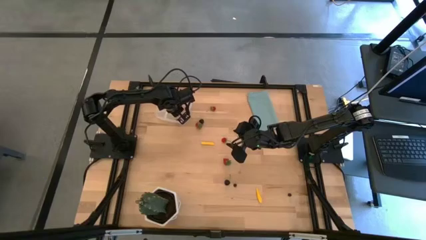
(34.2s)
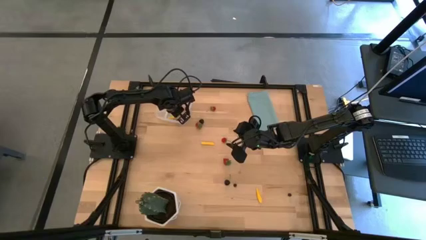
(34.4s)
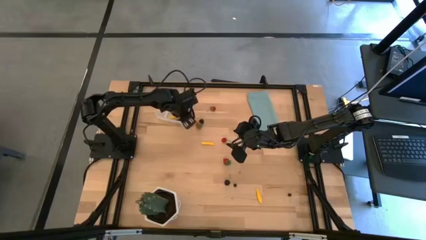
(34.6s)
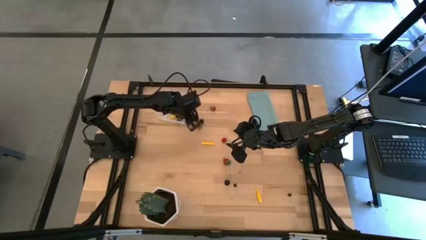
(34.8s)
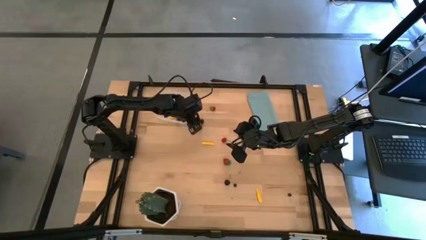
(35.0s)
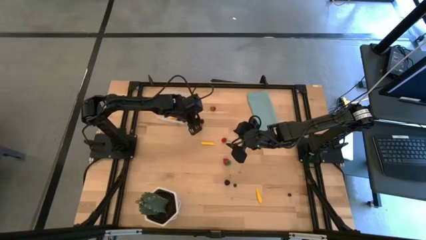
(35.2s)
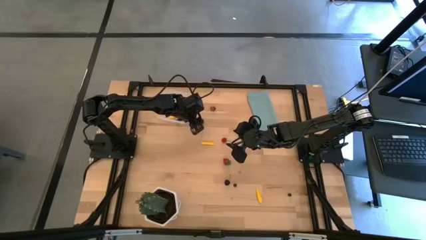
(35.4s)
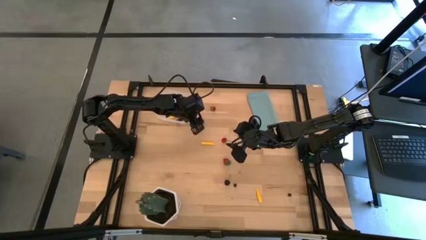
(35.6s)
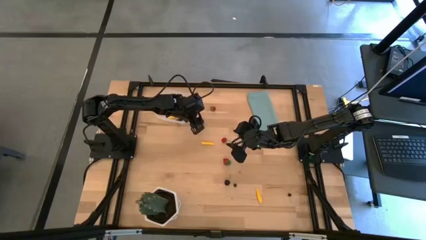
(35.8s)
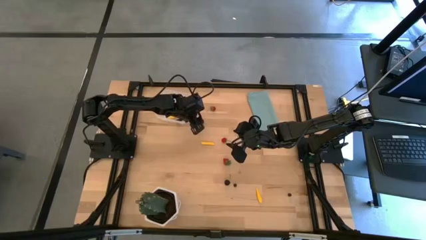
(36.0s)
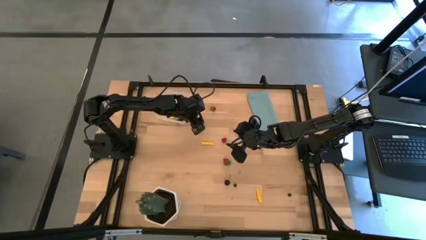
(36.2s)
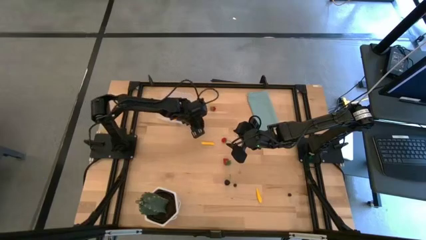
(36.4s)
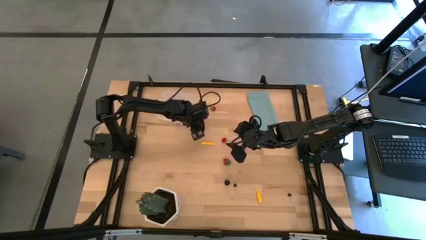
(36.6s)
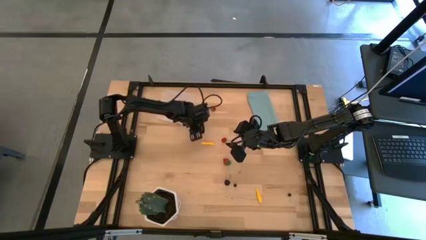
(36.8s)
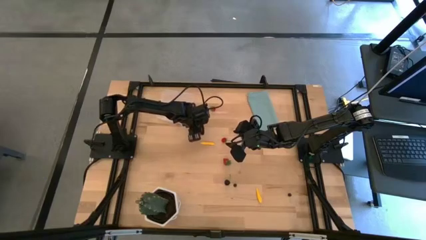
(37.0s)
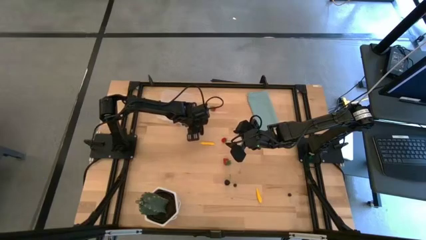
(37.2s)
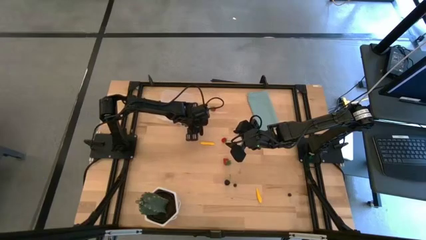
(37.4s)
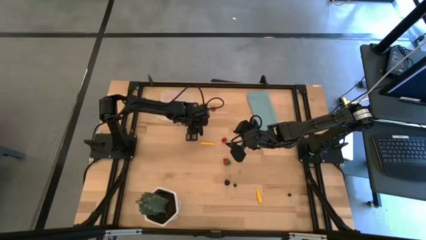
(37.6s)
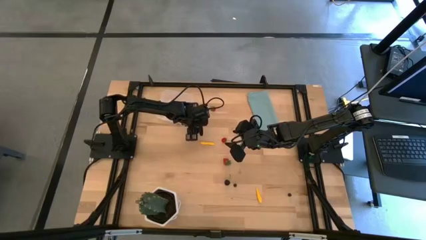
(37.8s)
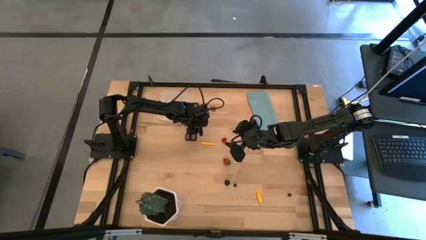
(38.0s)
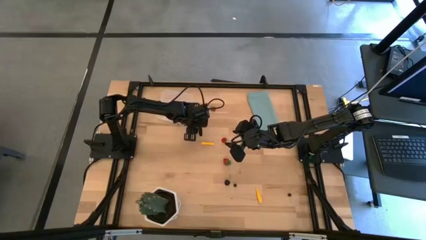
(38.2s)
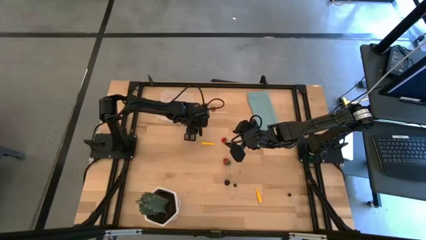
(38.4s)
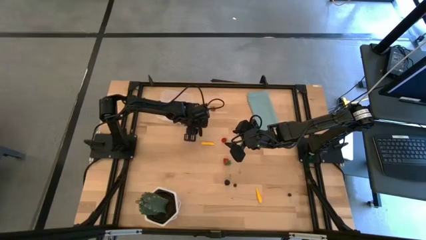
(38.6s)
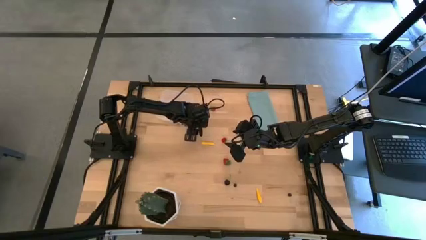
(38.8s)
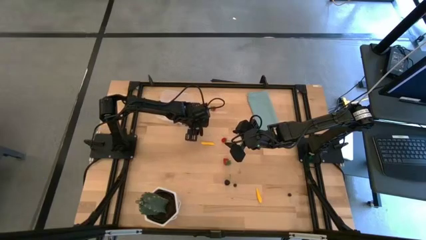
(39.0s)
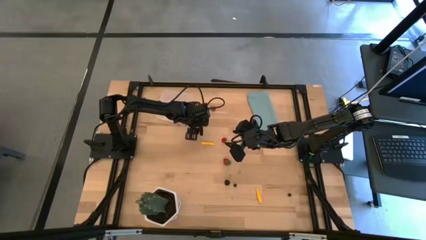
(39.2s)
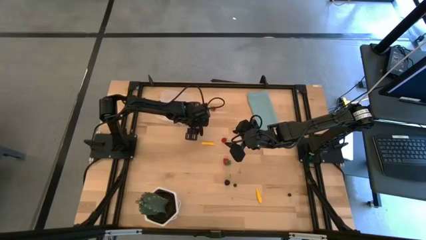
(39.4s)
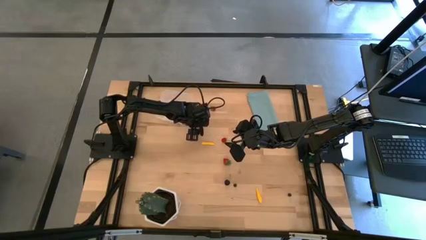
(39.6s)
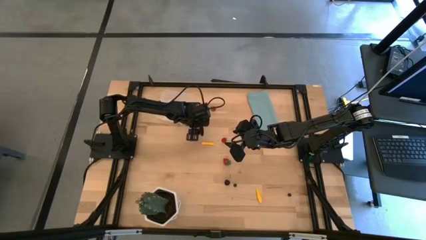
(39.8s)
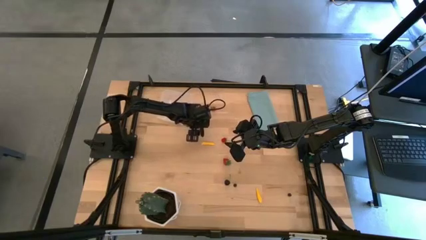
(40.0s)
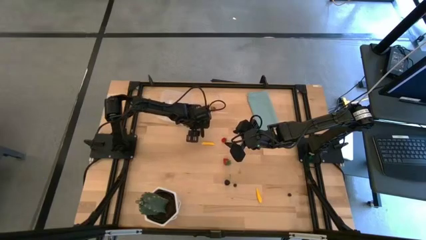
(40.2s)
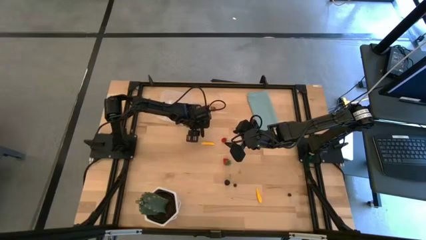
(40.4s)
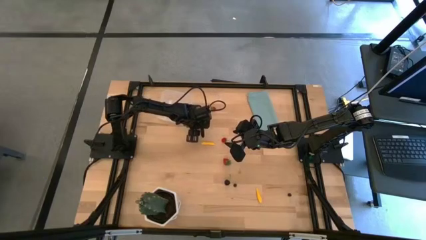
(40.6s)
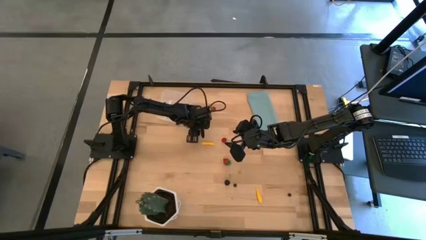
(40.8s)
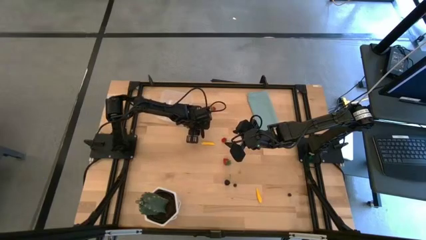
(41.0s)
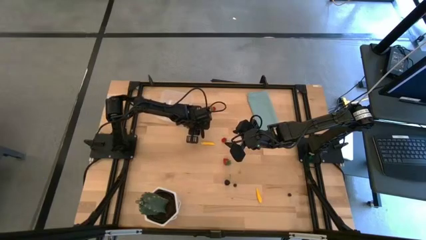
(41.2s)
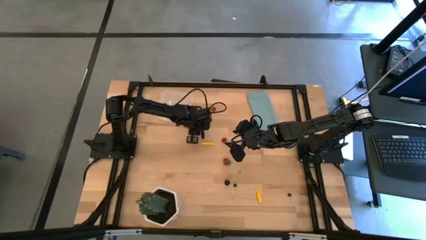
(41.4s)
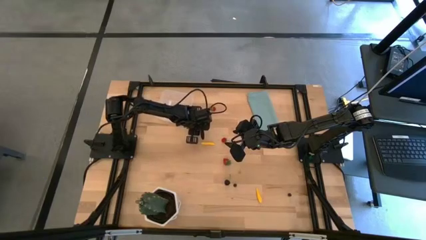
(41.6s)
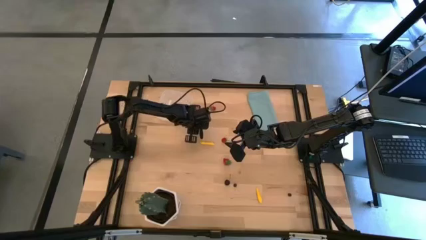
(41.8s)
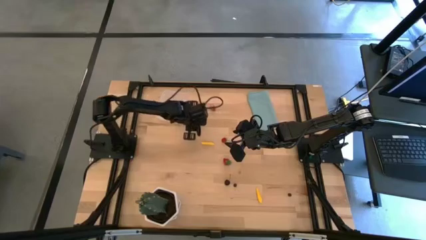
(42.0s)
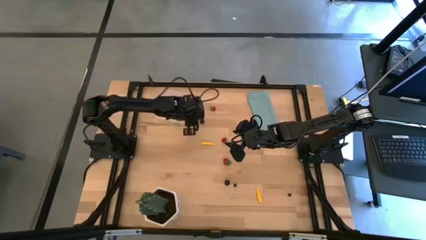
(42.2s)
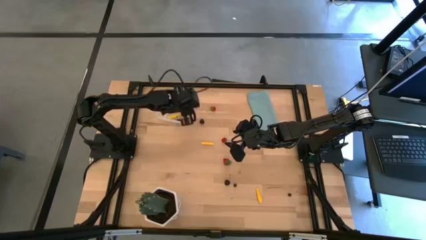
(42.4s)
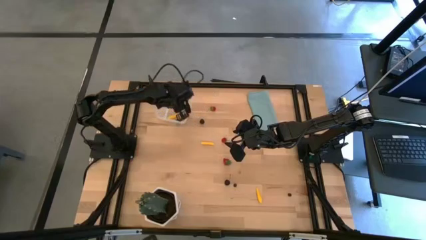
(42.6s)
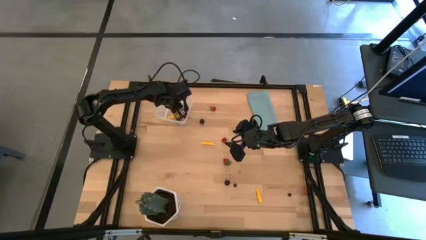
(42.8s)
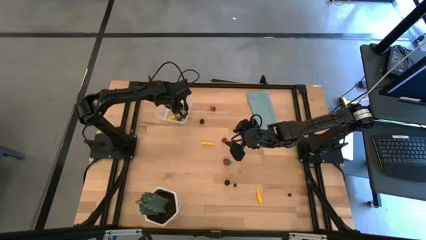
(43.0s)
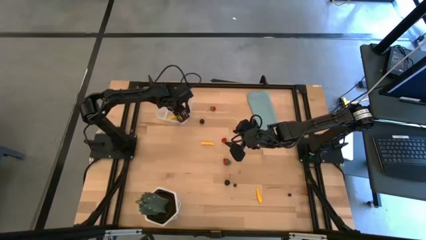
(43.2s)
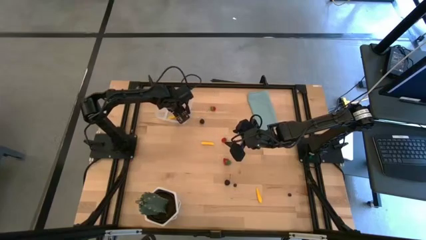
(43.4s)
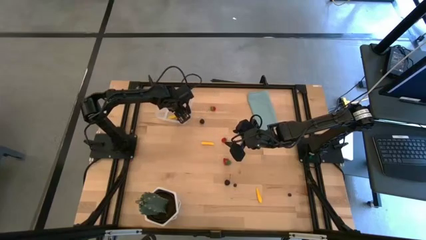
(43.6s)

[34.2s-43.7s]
Task: Pick and placing Produce into tupperware
Put the red strawberry into the transparent bin

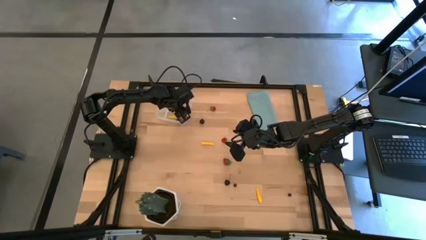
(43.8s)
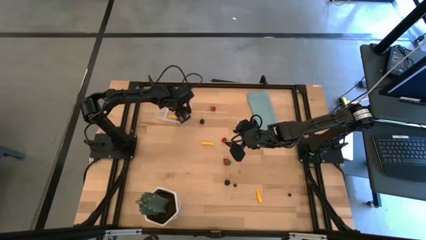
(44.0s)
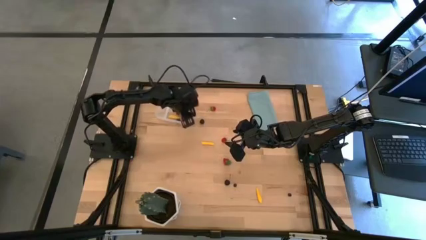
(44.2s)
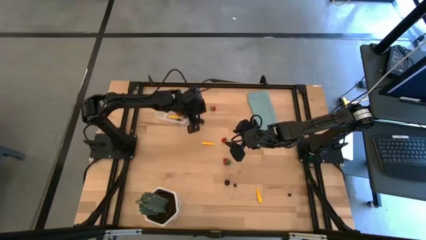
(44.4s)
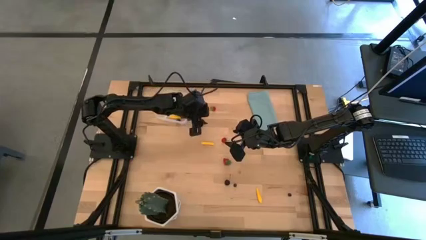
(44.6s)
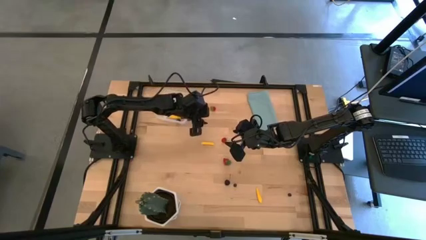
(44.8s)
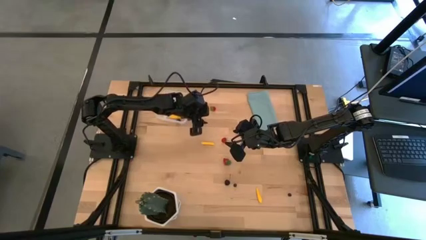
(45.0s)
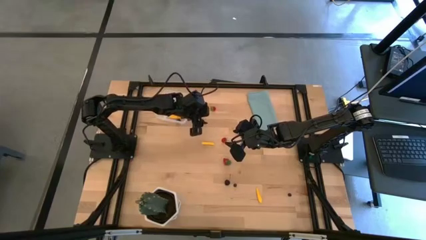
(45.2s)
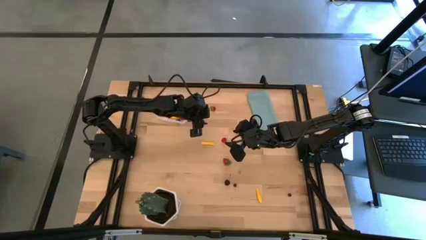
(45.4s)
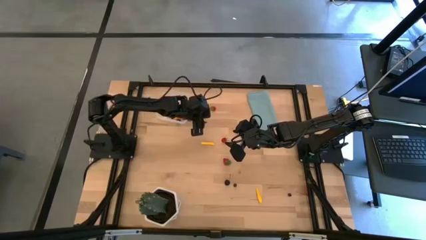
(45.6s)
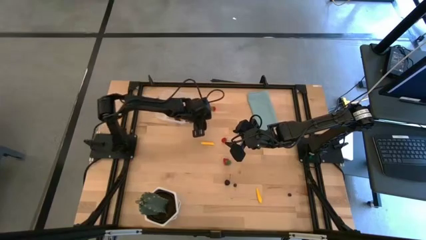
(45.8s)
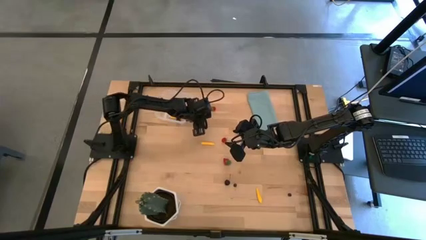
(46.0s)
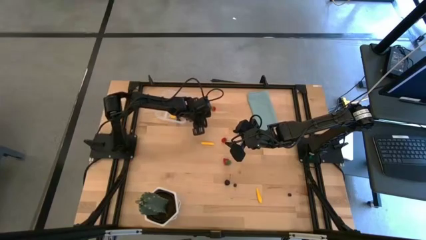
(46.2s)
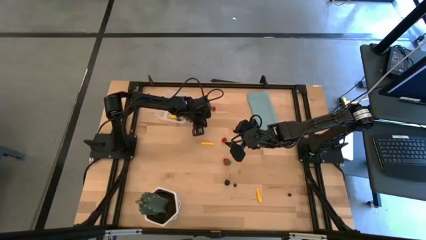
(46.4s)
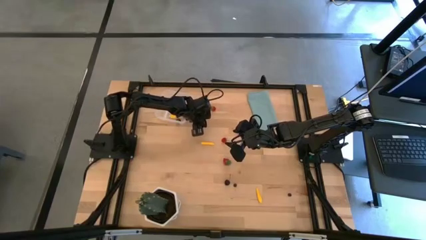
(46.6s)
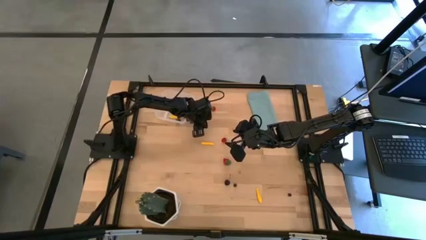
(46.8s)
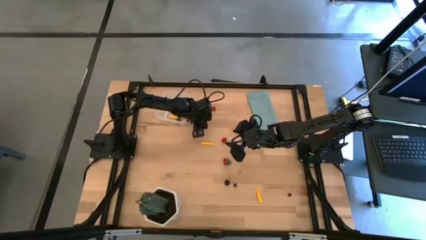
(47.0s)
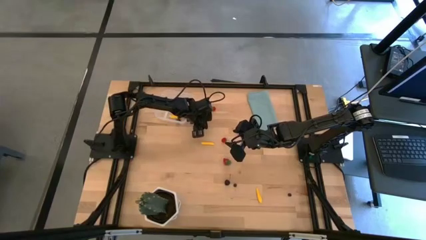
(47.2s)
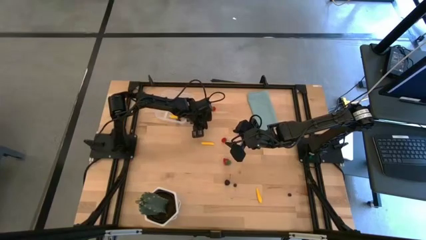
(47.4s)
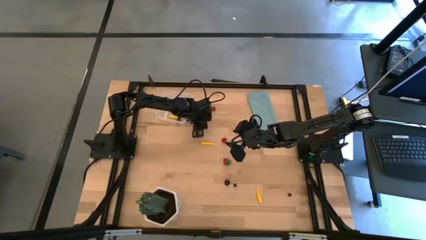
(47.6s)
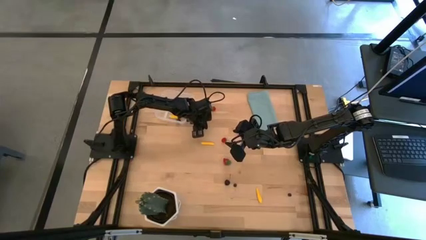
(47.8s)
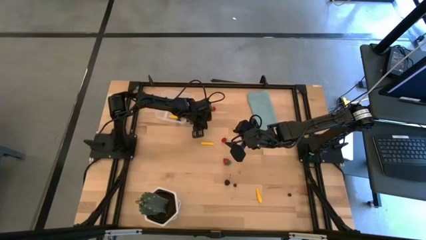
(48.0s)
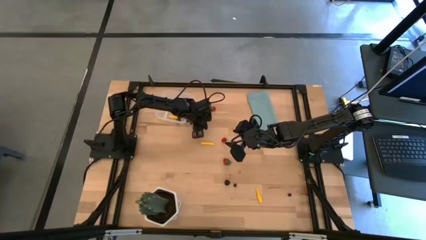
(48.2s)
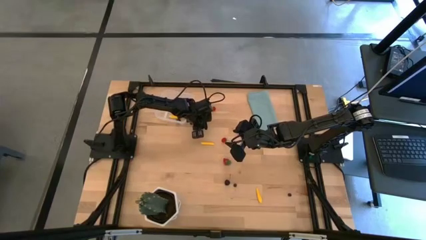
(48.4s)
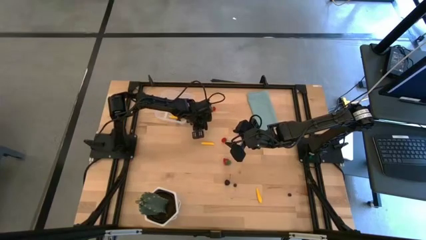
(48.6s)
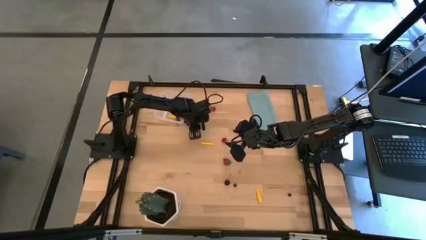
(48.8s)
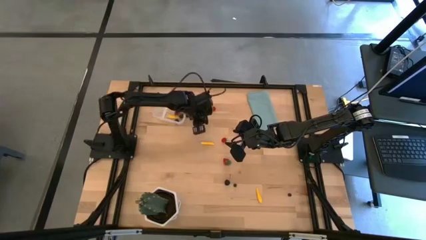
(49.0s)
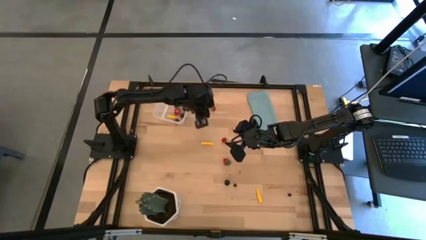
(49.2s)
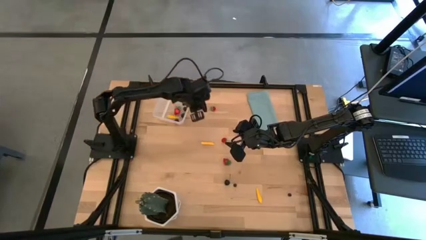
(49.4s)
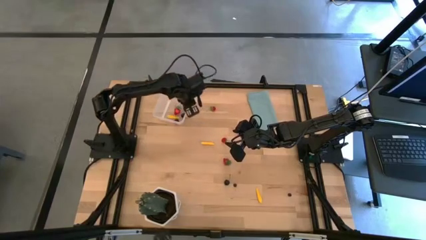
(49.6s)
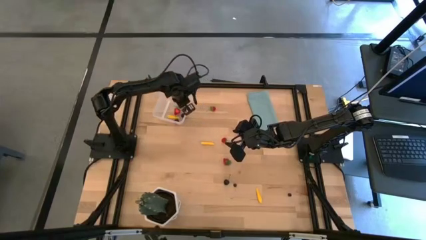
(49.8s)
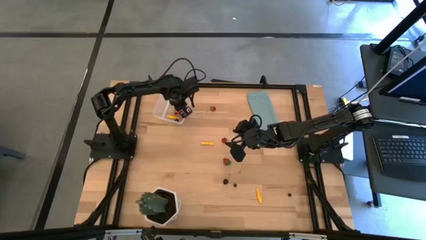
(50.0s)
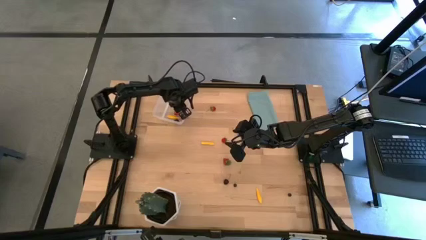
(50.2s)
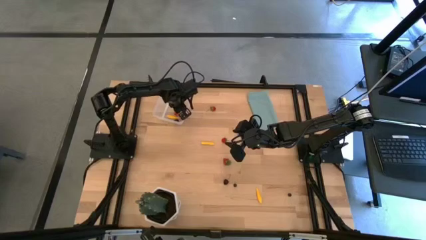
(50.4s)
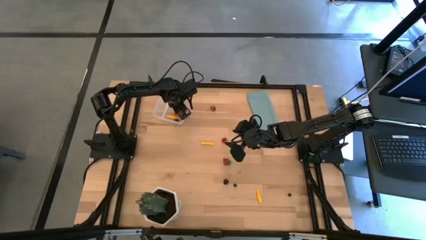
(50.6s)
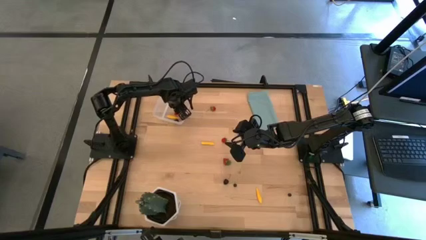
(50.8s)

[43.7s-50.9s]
Put the black cherry into the transparent bin
